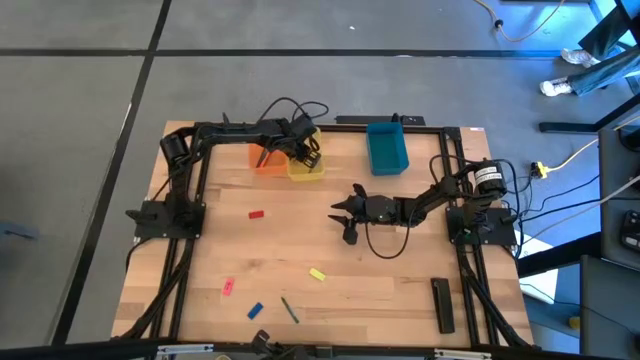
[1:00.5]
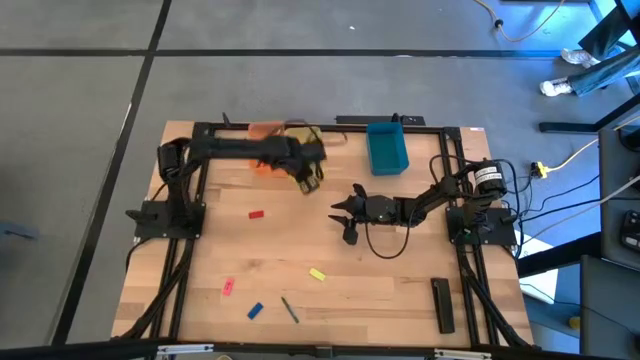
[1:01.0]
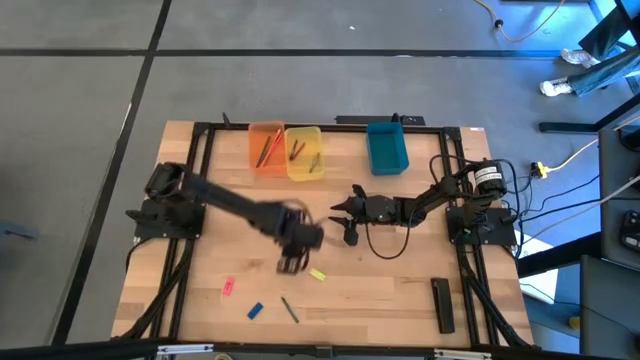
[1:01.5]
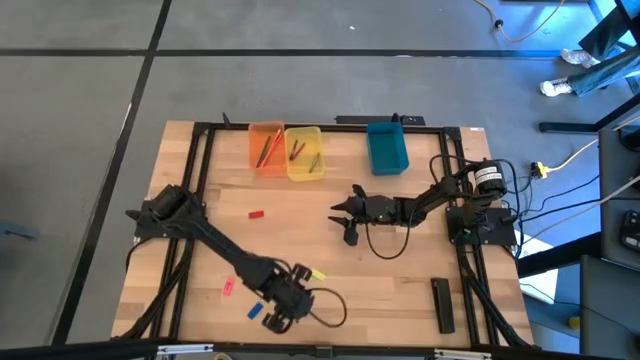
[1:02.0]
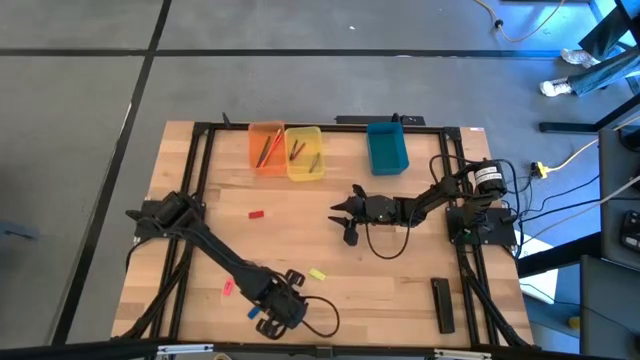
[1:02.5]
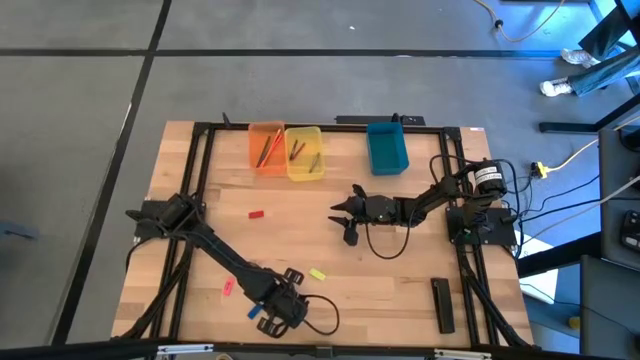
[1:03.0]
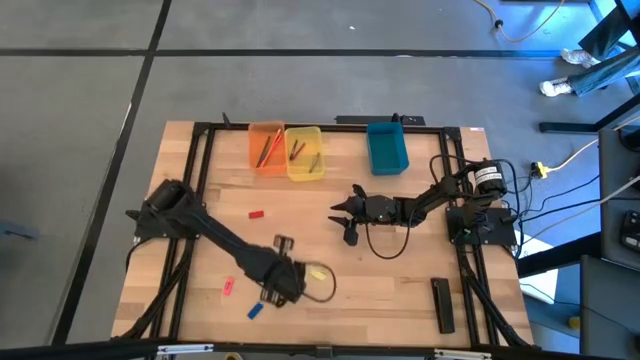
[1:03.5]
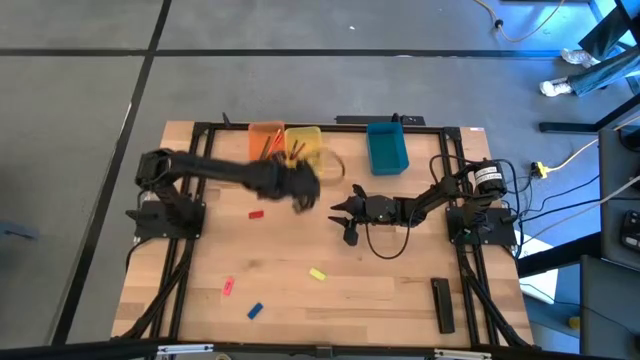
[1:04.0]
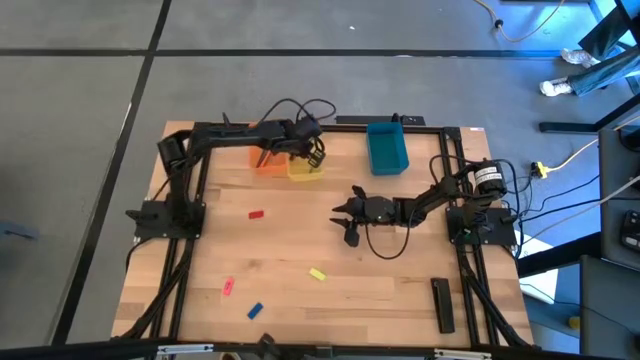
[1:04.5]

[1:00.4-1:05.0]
Task: Sort crayons/erasers/pens/pencils in bins
Put the green crayon into the yellow bin

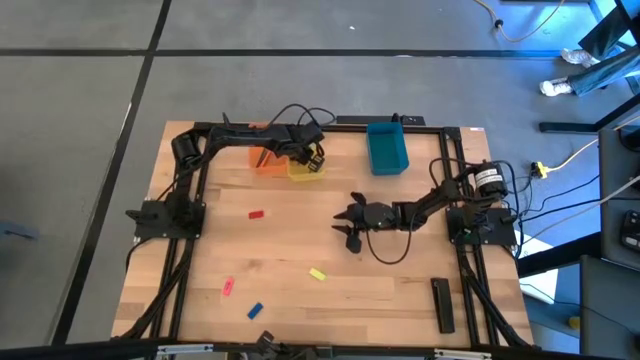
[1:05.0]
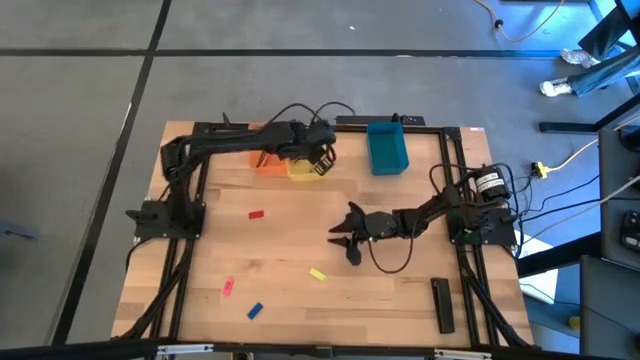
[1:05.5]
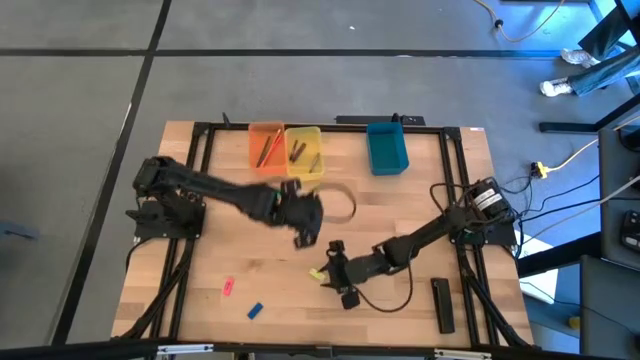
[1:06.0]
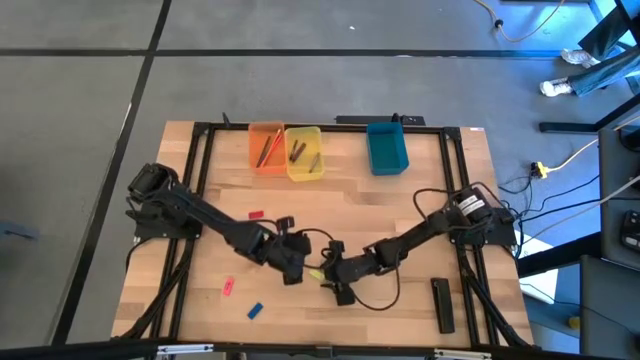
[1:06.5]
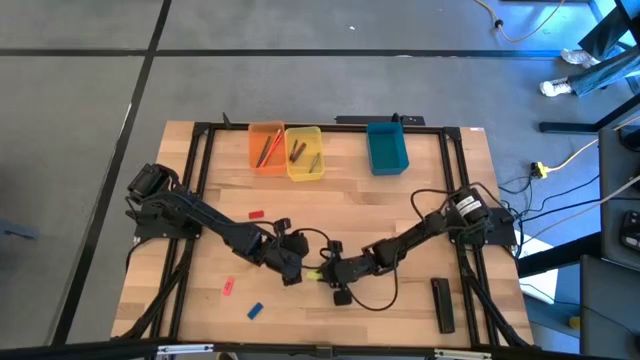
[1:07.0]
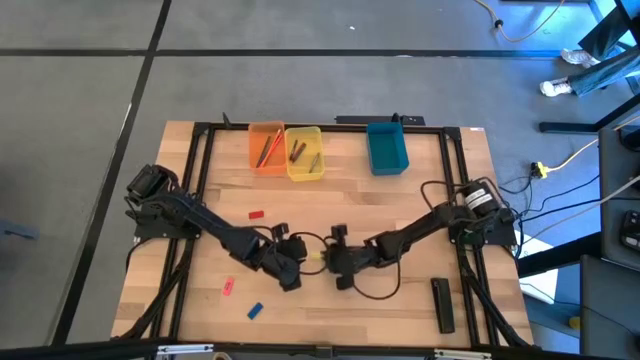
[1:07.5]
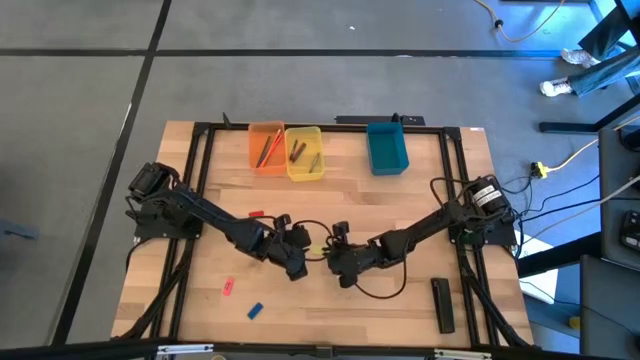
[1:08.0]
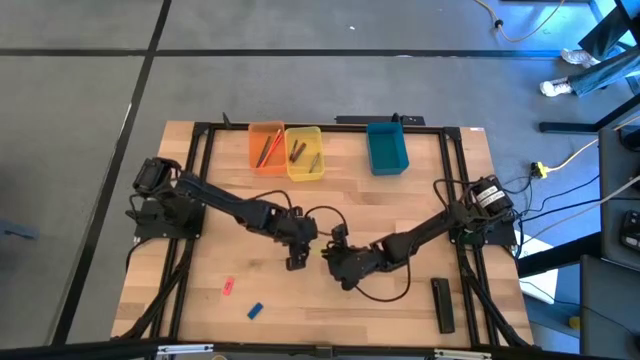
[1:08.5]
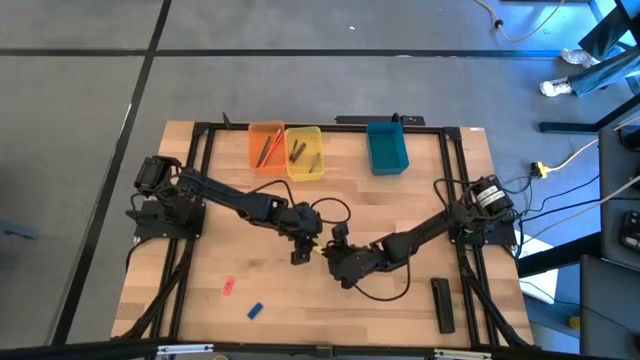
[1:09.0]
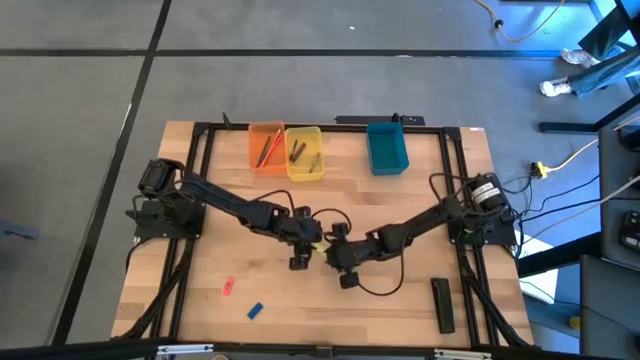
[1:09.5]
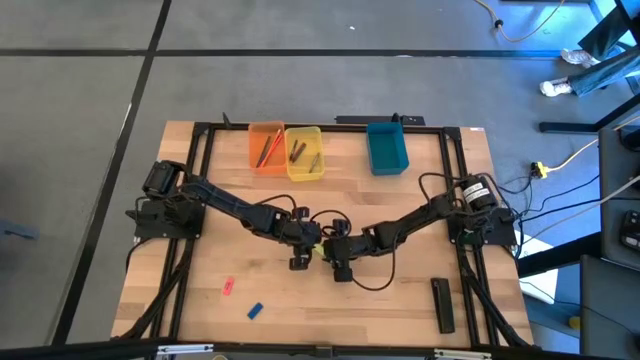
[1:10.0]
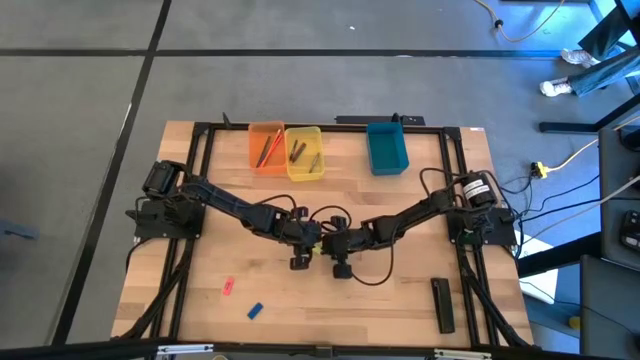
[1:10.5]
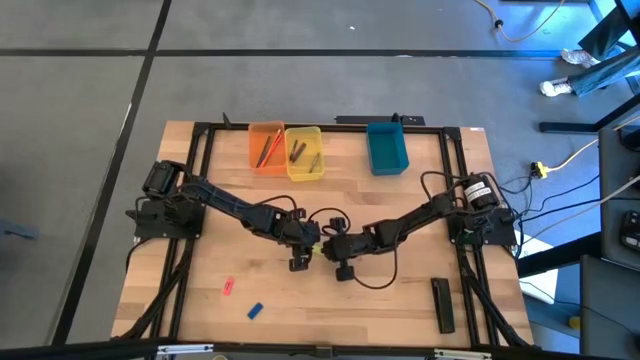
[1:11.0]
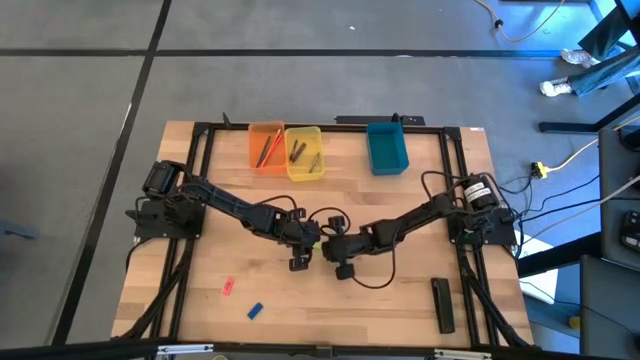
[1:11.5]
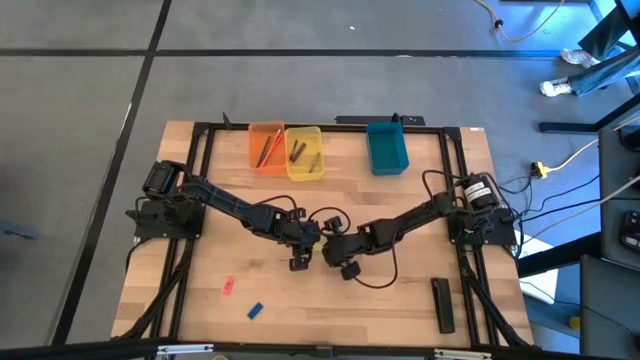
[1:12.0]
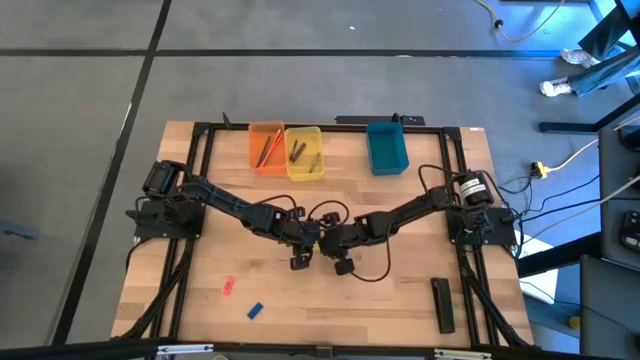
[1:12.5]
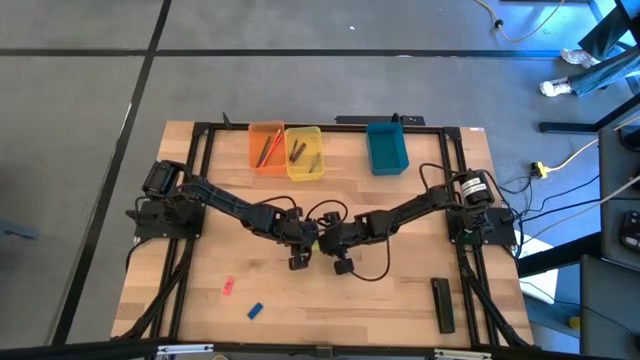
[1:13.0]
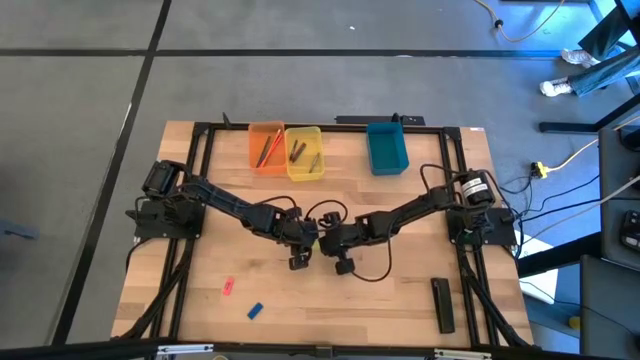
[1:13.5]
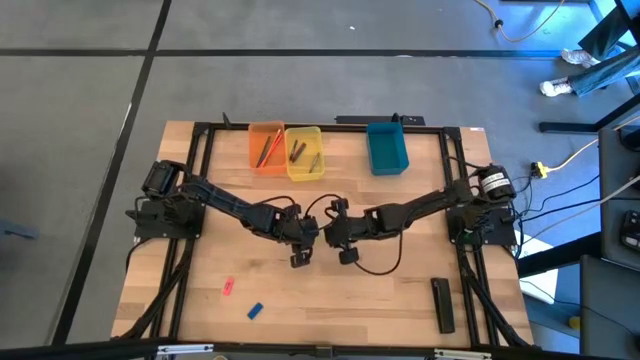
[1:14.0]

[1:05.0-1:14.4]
Put the yellow eraser into the blue bin

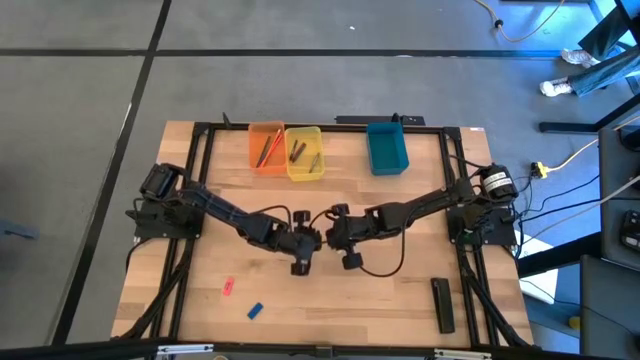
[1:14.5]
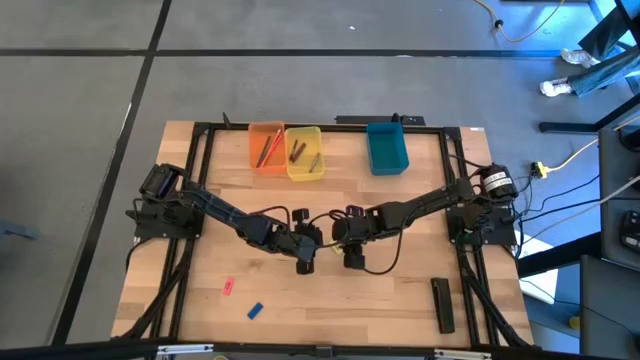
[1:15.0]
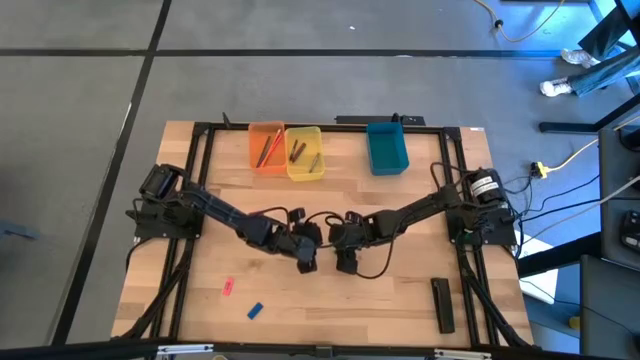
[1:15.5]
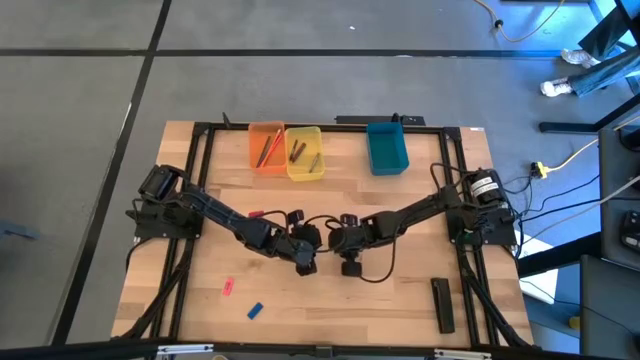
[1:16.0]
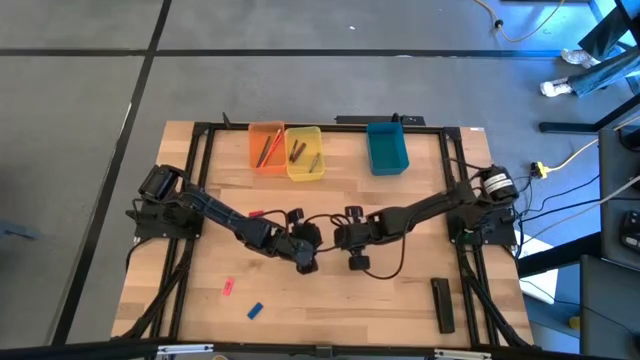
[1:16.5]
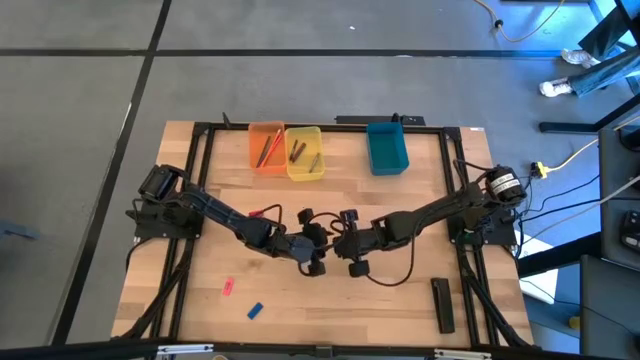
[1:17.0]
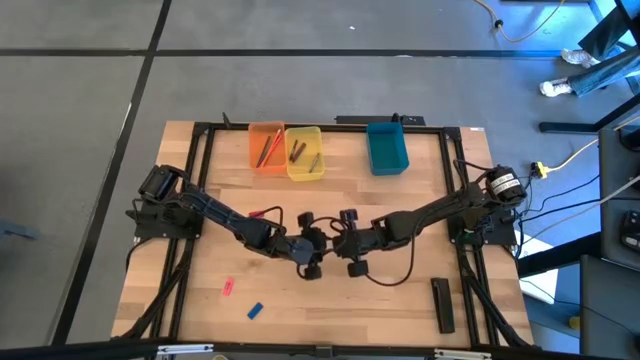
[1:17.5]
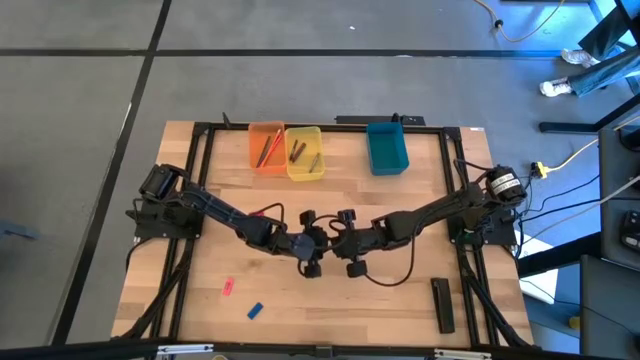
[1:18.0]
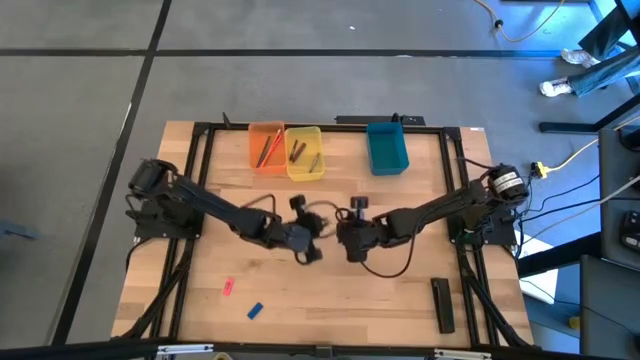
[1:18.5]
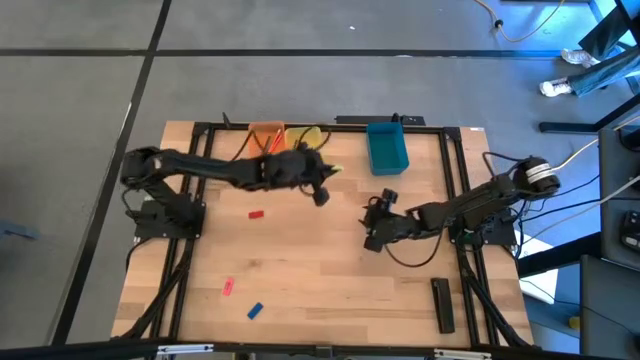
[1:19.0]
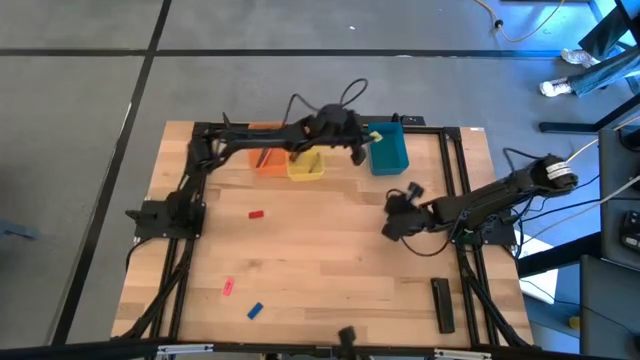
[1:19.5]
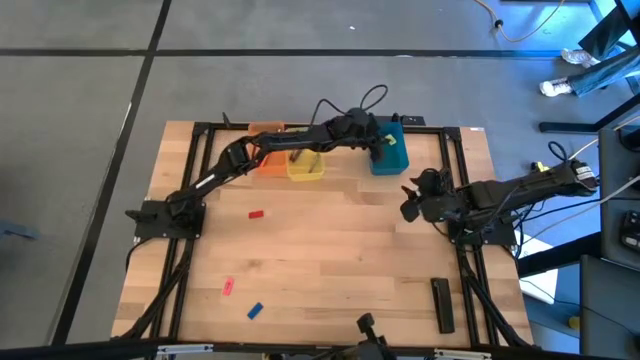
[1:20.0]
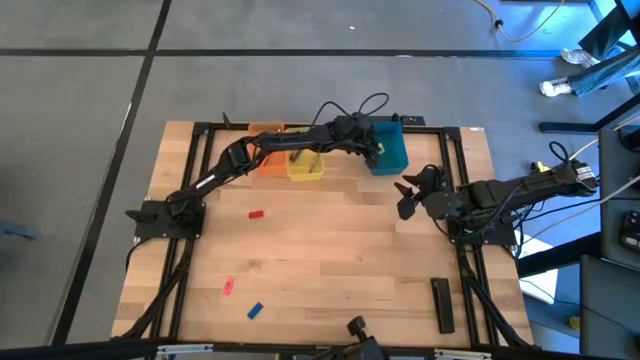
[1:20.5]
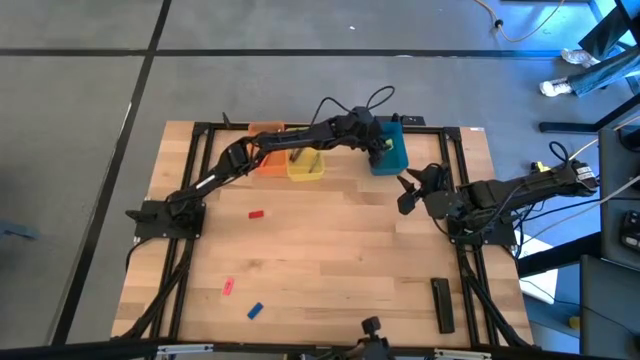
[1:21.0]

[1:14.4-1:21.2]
Put the yellow eraser into the blue bin

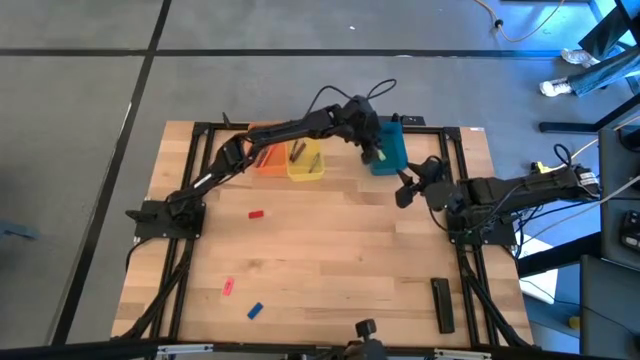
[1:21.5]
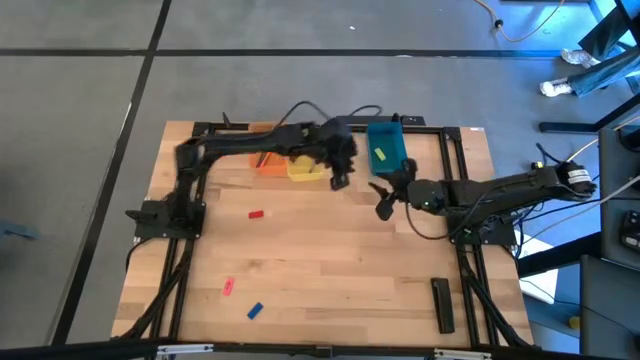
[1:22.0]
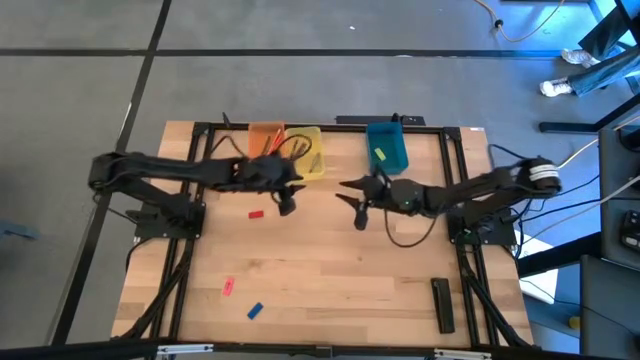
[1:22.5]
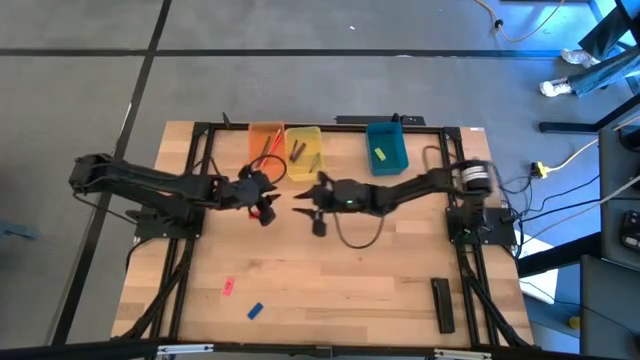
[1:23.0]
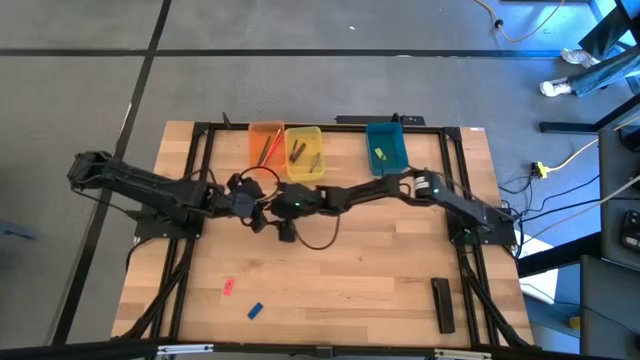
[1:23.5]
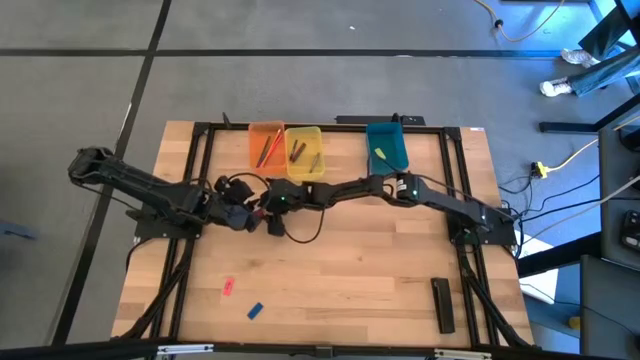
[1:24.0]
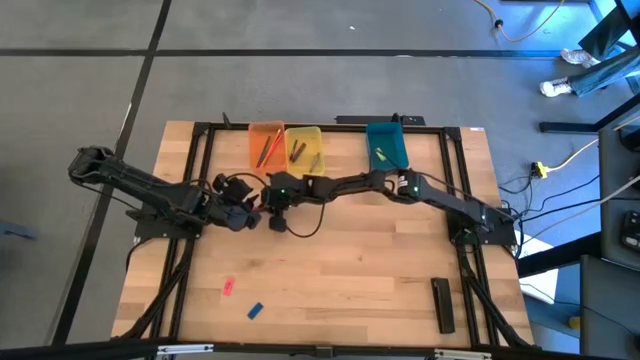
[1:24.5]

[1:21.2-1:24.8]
Put the red eraser into the blue bin
